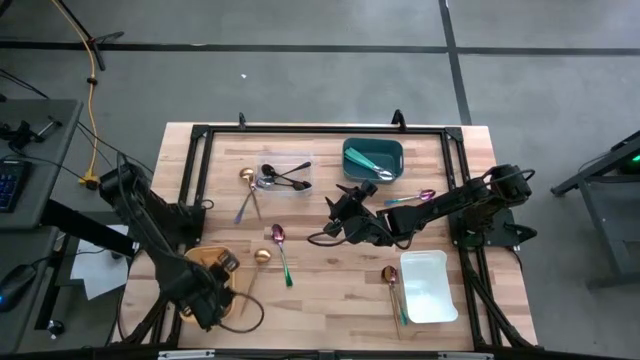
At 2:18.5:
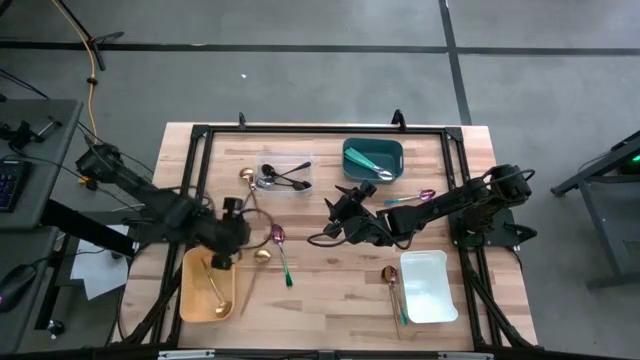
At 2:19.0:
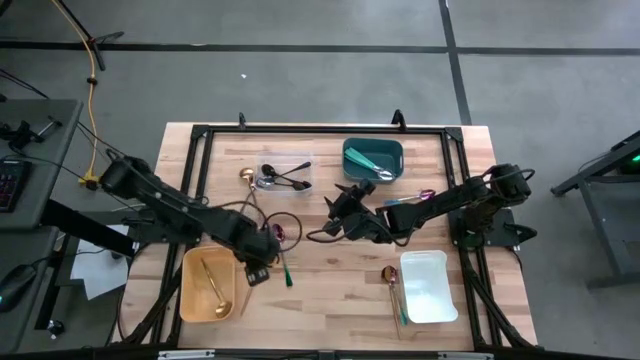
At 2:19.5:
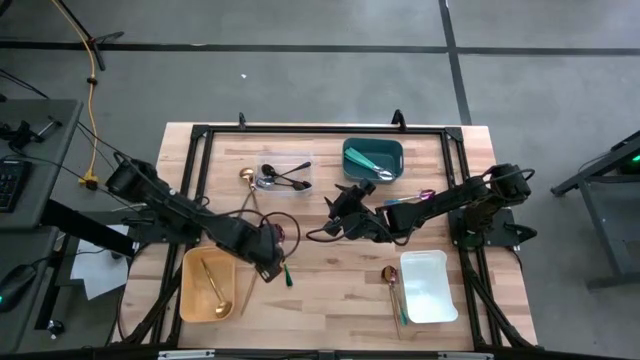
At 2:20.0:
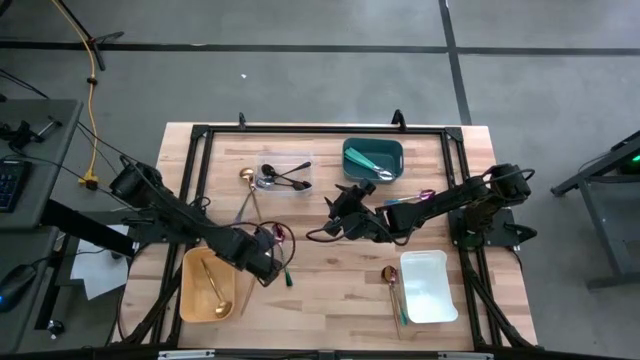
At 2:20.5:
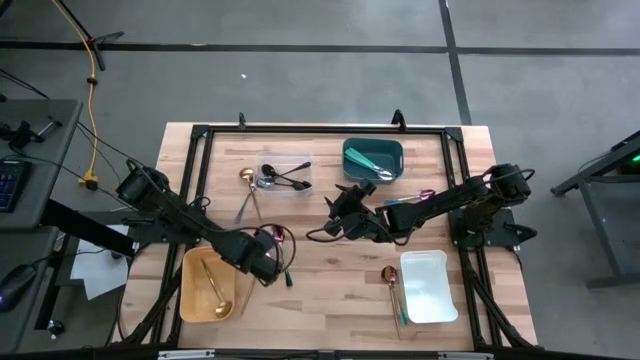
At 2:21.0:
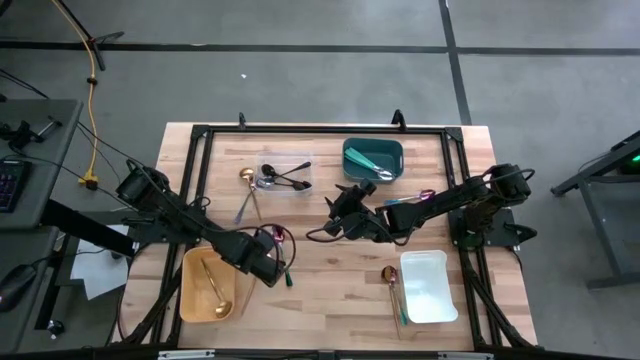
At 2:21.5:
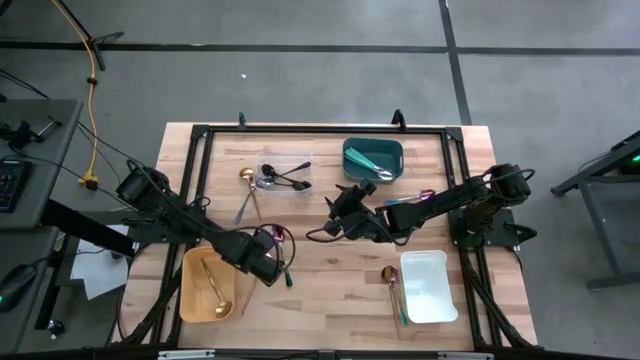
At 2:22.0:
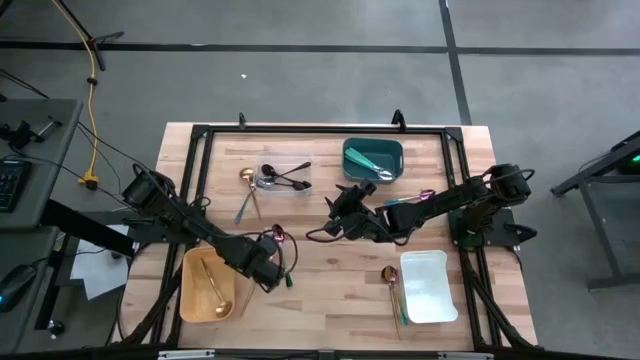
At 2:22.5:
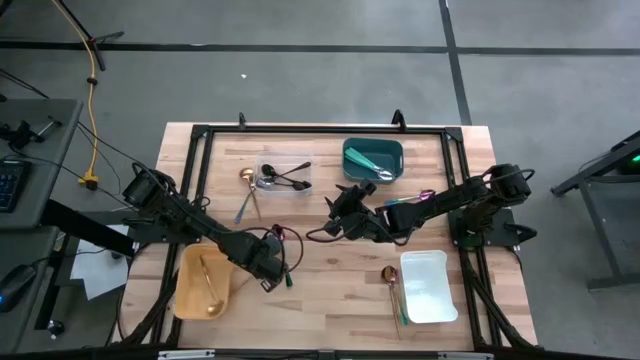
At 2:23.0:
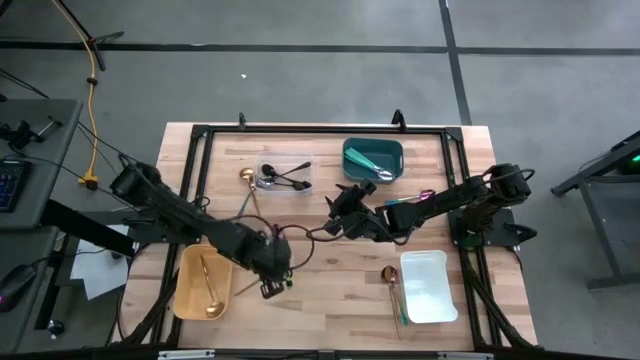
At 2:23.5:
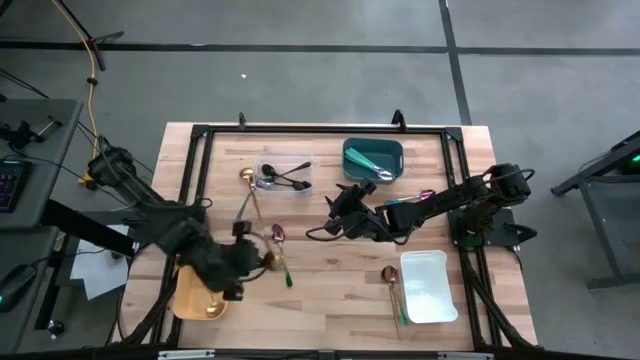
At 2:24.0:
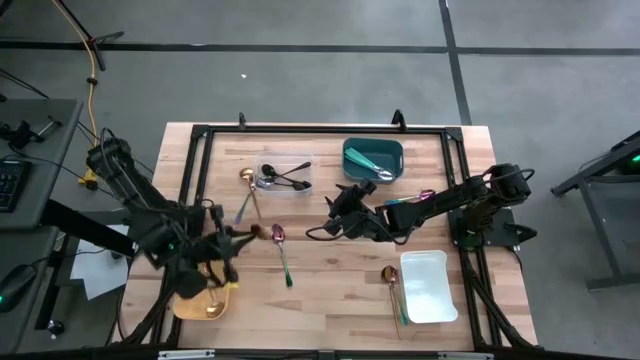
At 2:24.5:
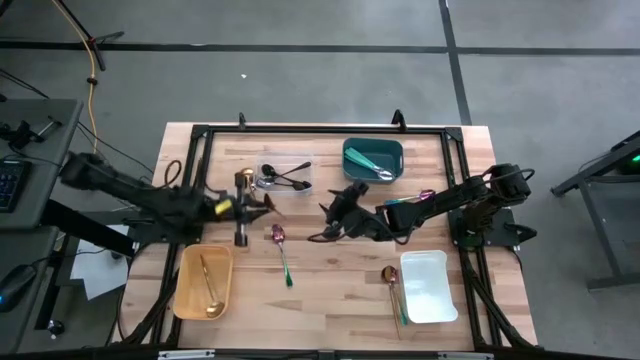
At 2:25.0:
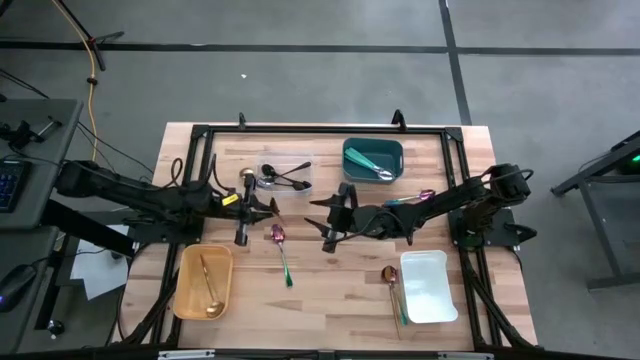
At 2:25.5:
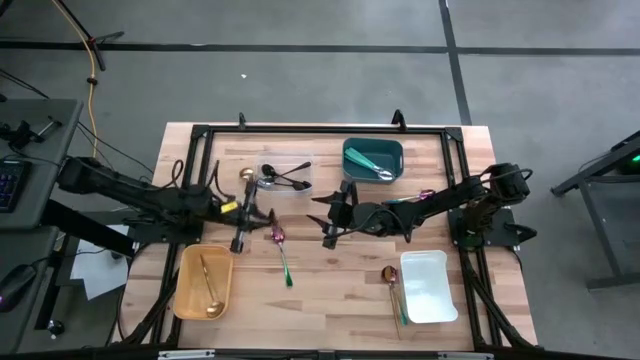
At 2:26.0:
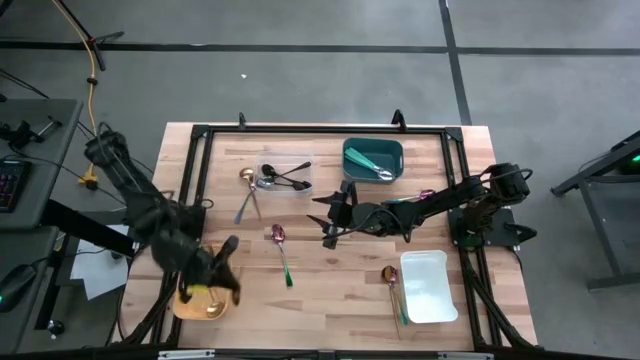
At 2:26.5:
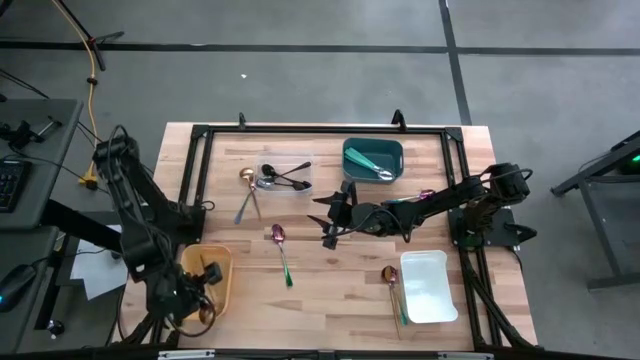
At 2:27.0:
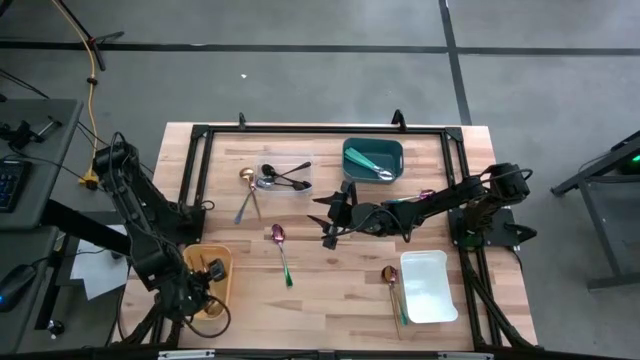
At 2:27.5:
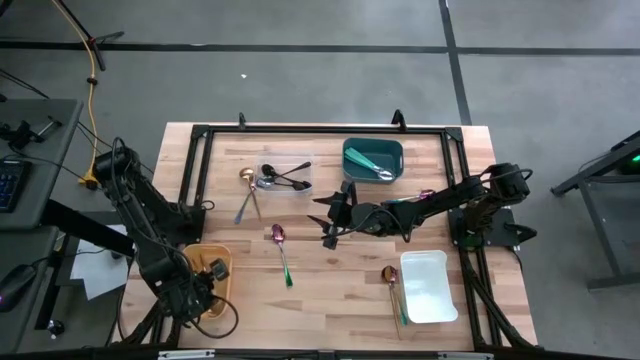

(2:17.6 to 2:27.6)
Task: Sort silverware by color (type)
Put the gold spoon into the yellow bin

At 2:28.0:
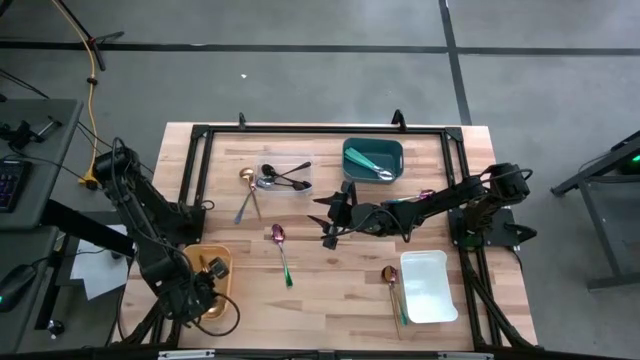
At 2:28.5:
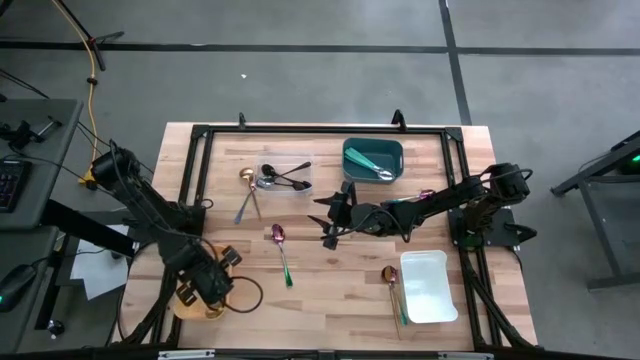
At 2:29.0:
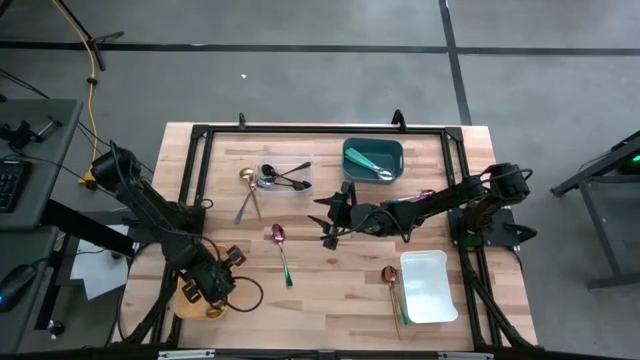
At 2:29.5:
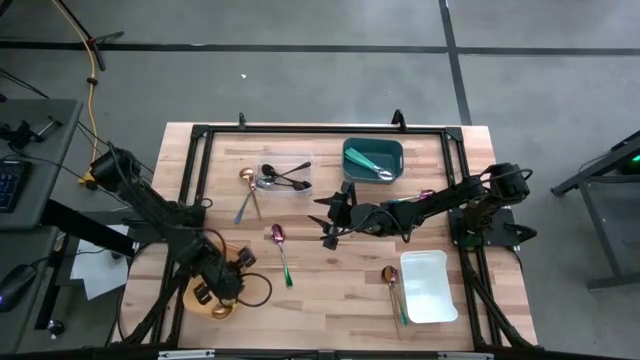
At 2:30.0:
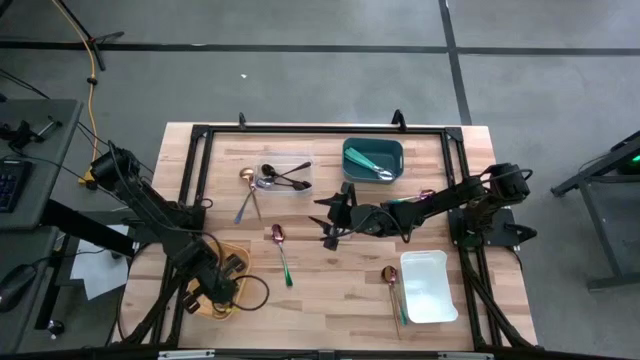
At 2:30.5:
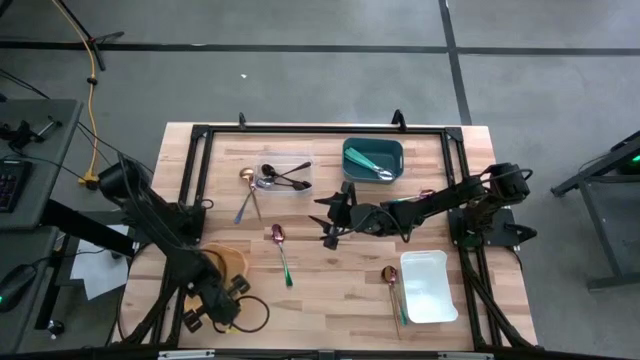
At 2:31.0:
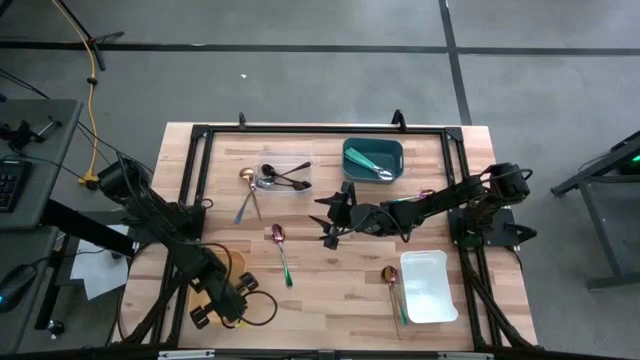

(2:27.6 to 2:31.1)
Adjust the yellow bin

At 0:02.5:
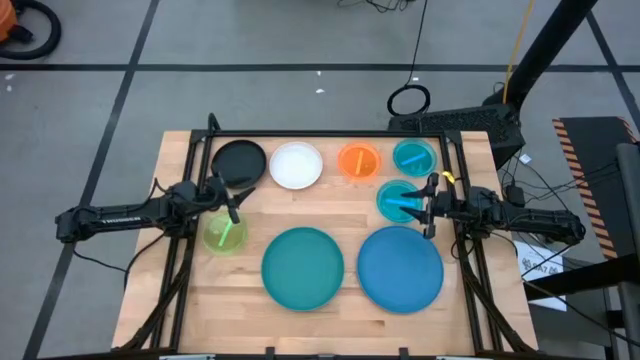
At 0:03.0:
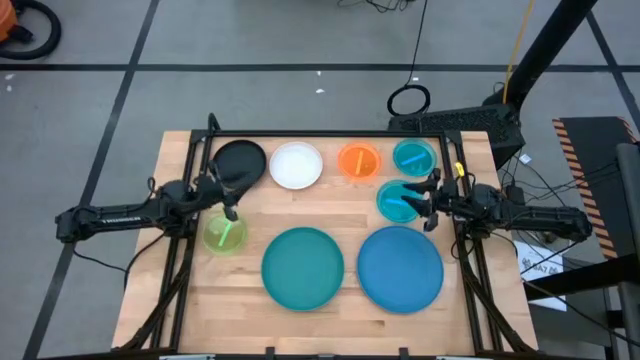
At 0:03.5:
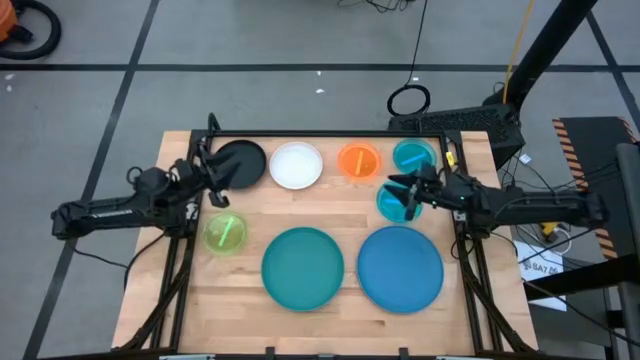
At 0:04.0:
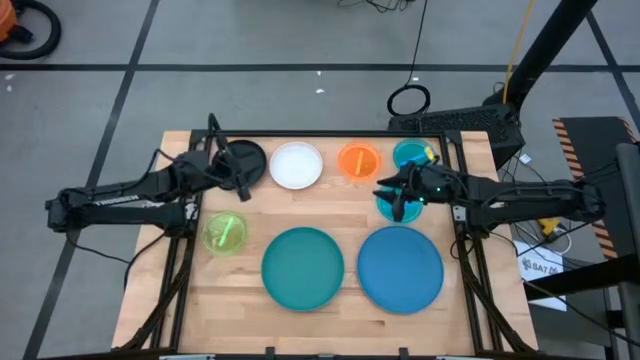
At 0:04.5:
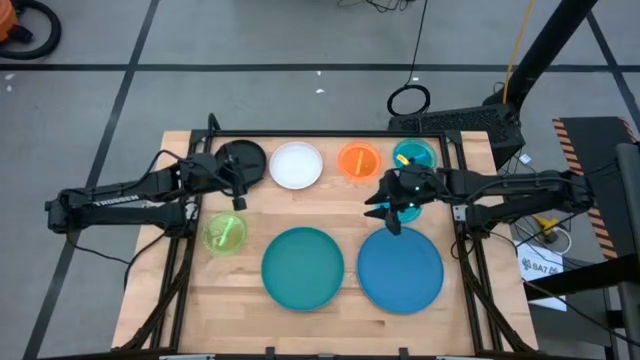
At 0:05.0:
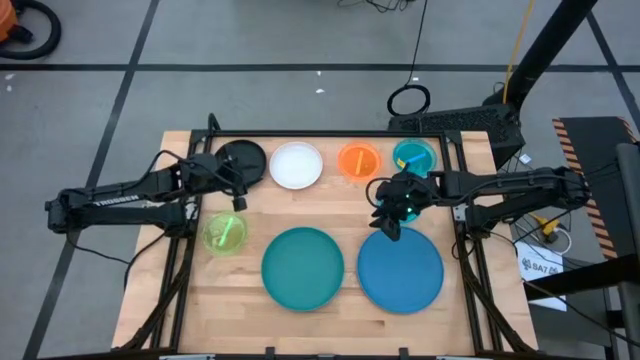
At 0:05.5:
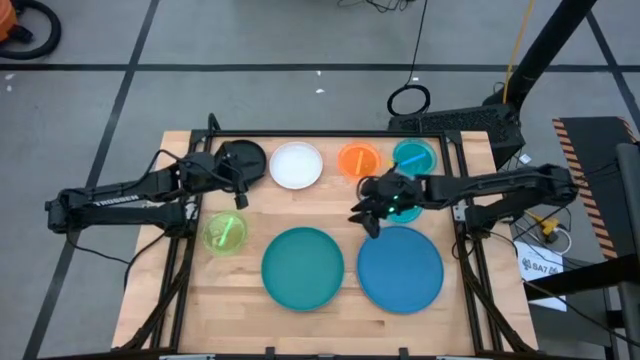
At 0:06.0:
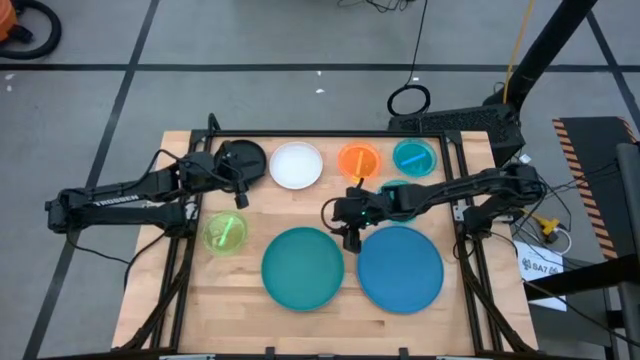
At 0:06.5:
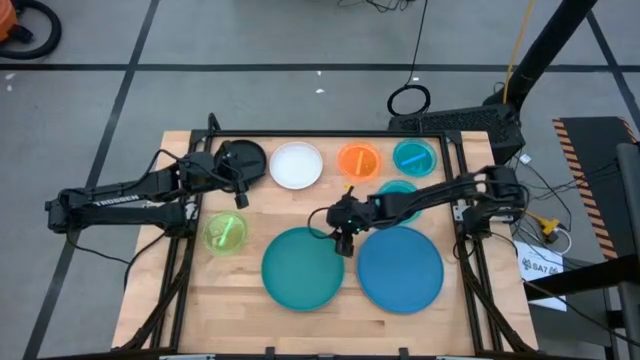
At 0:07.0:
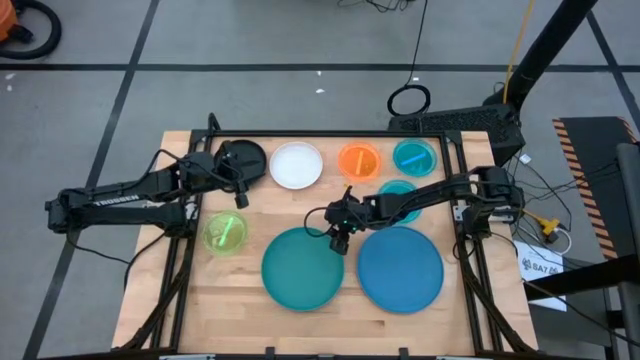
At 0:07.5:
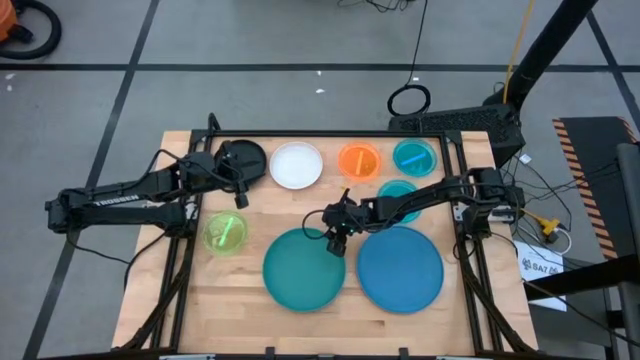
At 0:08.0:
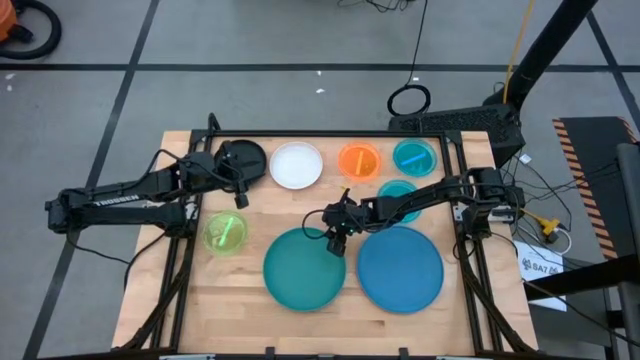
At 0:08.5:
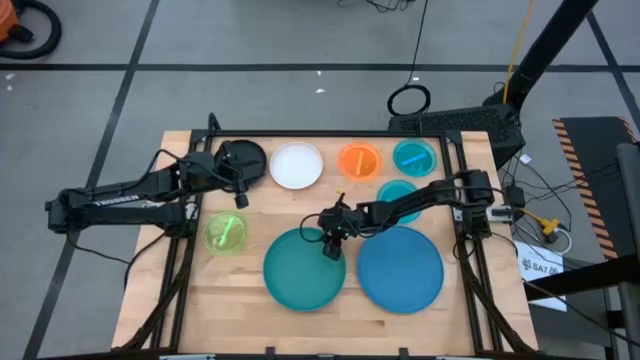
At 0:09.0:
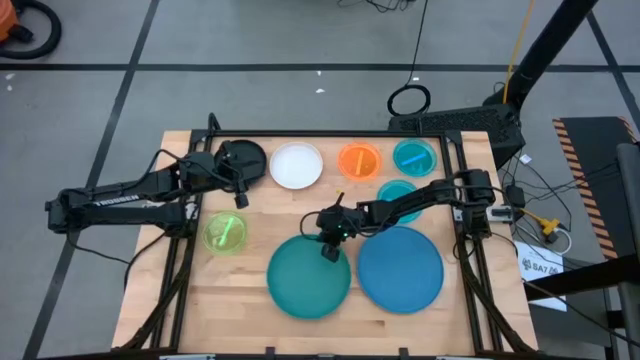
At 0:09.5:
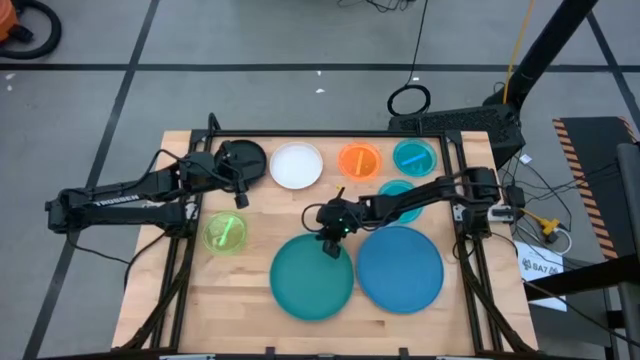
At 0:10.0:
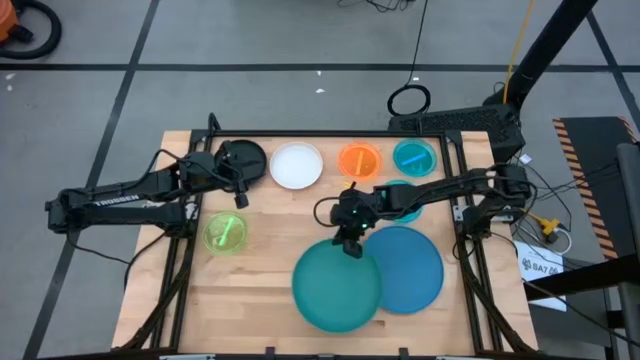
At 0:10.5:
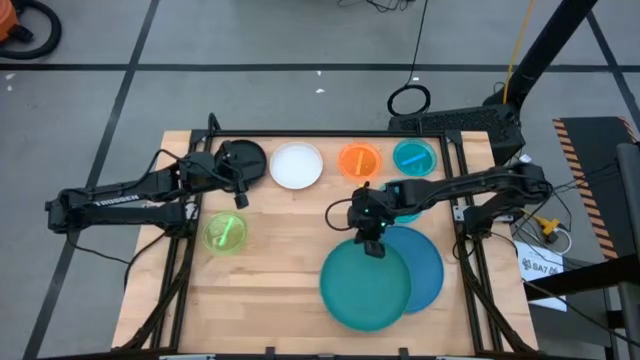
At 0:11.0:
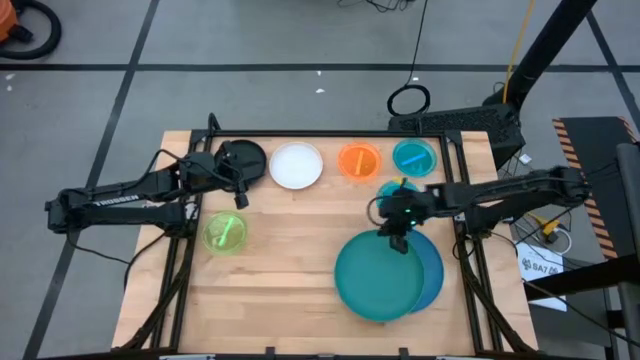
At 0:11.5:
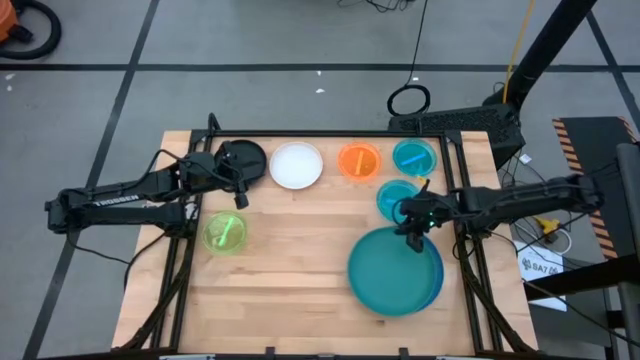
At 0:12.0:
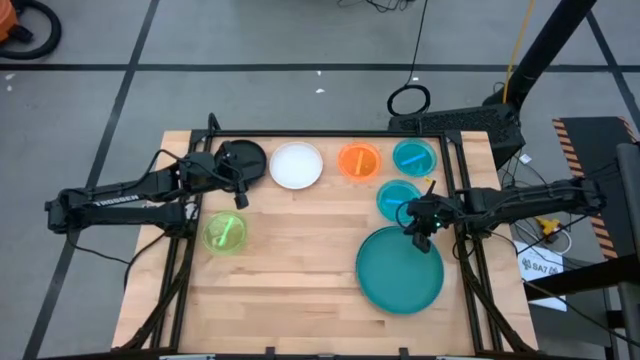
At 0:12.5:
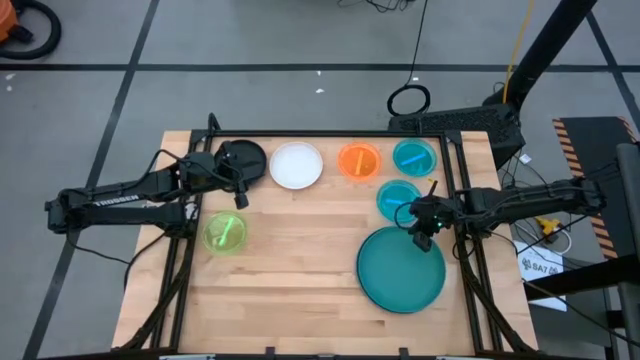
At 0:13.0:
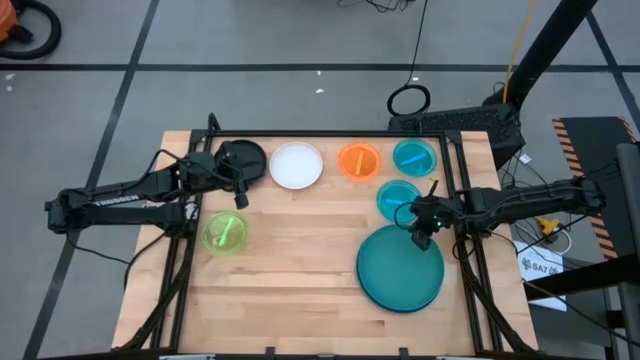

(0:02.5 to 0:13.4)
Task: Stack plastic plates
Stack the green plate on top of the blue plate
